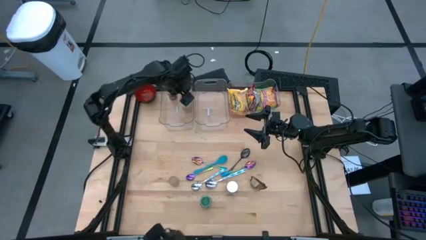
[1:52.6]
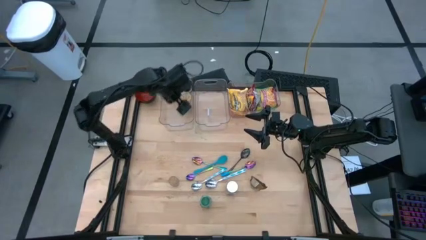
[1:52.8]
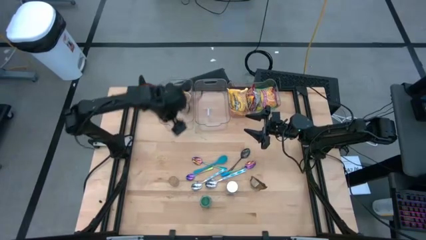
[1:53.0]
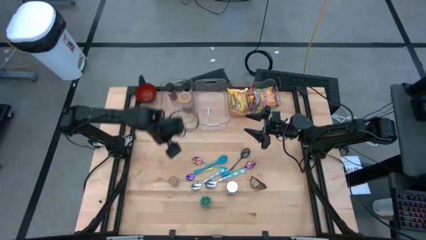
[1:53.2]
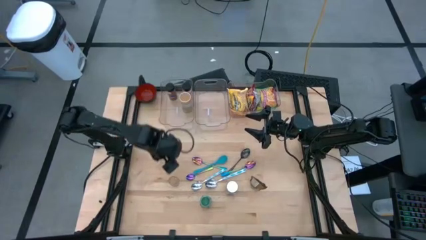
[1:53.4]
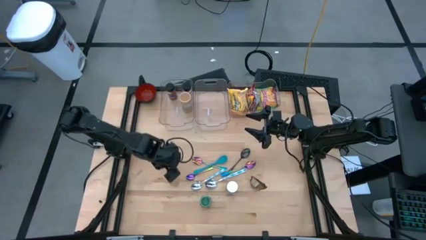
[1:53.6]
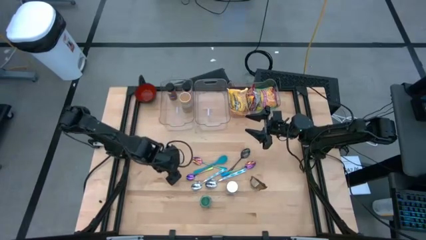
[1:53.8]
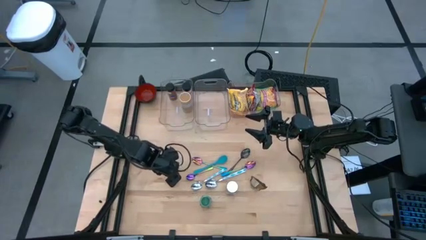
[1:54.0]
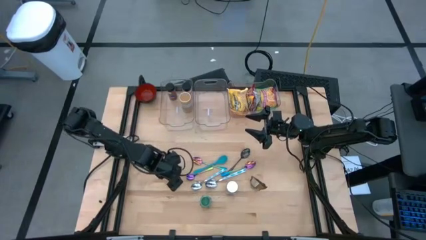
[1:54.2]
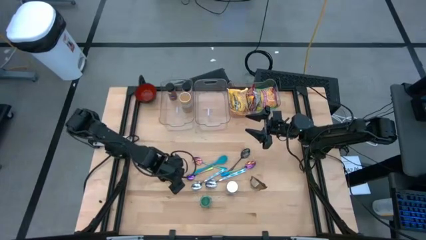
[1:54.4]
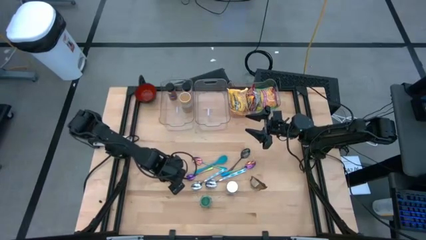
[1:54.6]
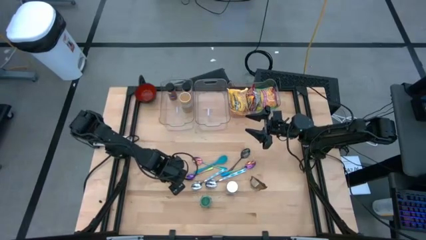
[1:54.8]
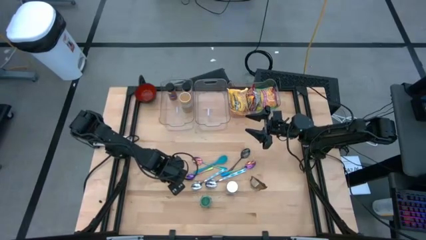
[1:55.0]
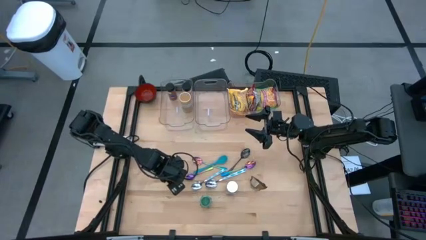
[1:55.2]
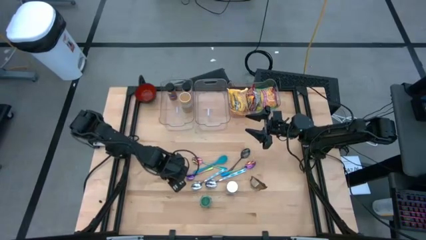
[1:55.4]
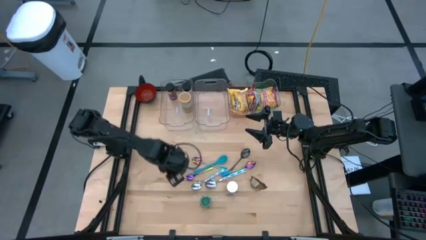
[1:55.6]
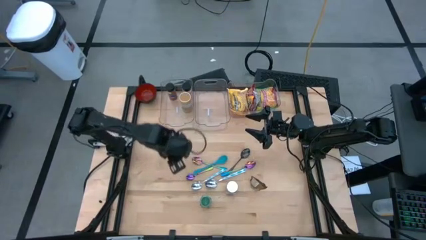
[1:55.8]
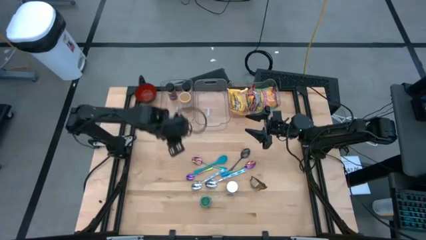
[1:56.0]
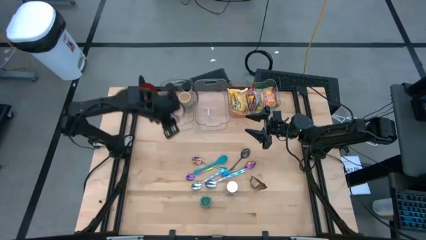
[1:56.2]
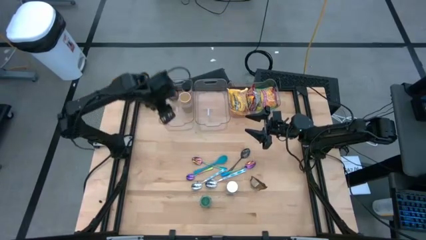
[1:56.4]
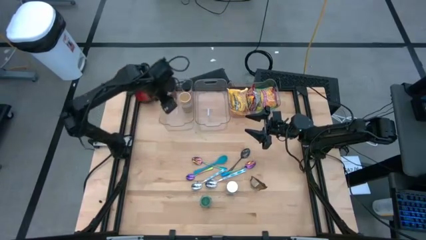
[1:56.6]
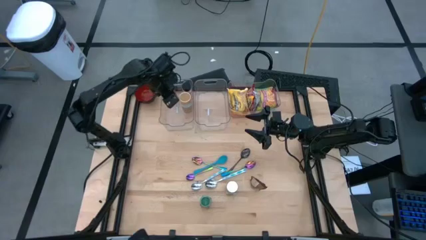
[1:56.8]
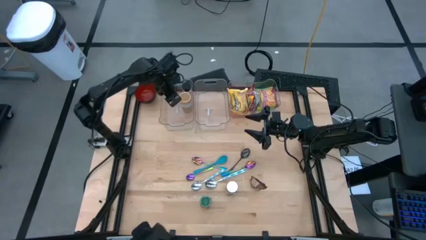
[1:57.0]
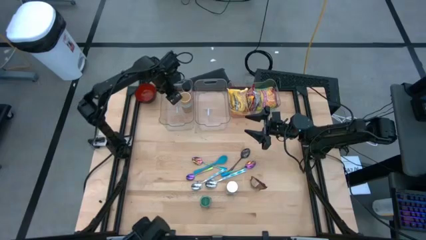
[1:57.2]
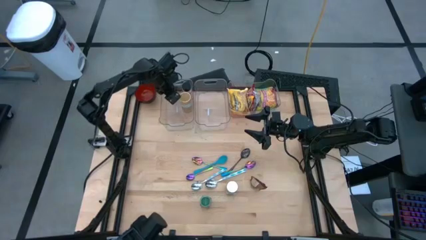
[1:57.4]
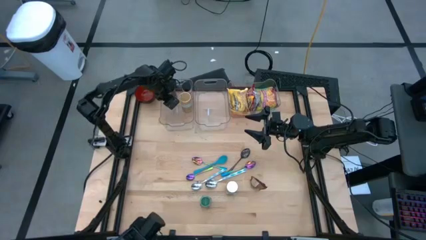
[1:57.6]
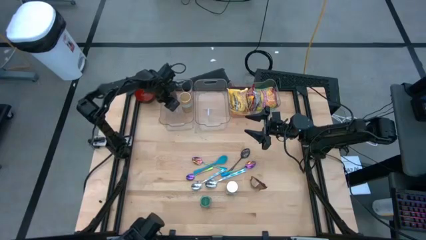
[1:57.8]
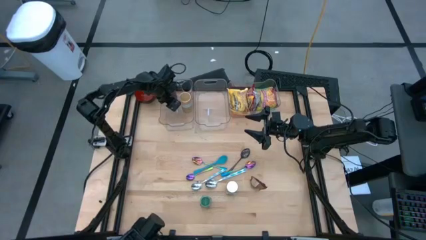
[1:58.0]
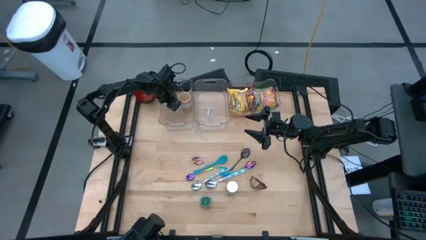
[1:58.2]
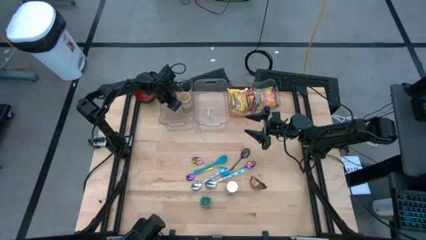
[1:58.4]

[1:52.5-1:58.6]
Task: Pick & Place Food Item
Put the brown seasoning bottle into the left transparent bin

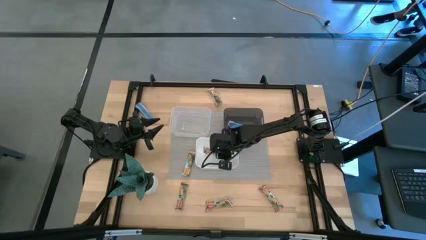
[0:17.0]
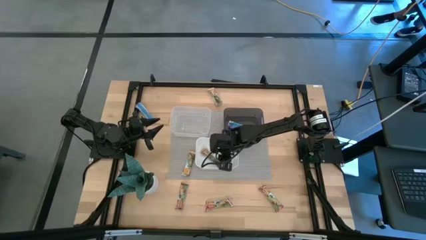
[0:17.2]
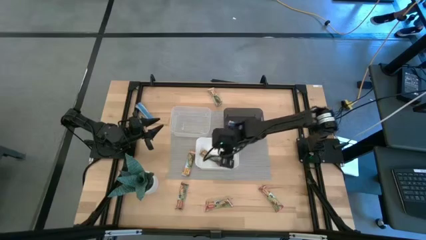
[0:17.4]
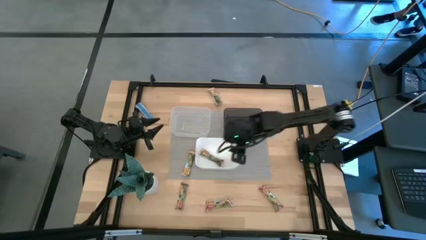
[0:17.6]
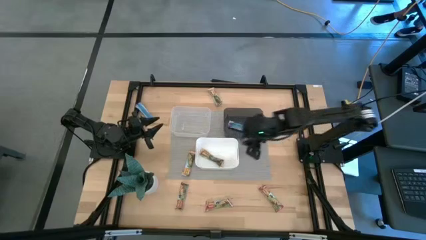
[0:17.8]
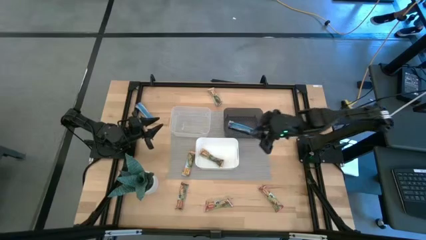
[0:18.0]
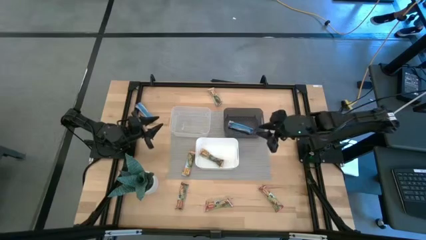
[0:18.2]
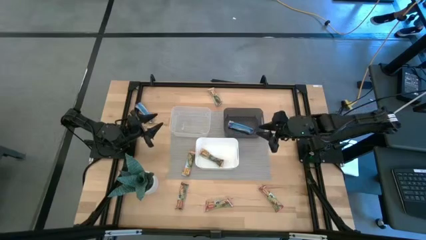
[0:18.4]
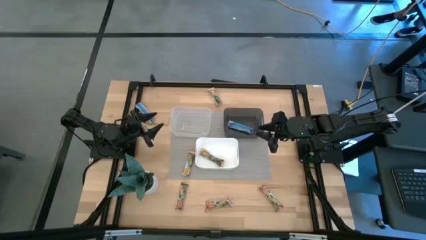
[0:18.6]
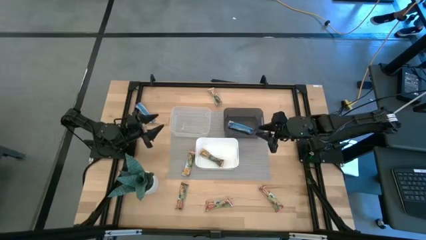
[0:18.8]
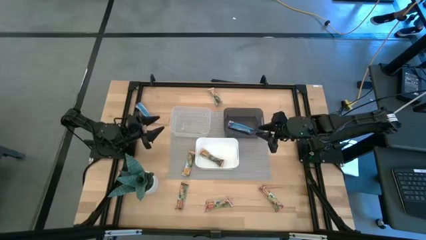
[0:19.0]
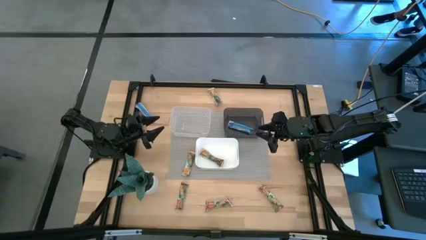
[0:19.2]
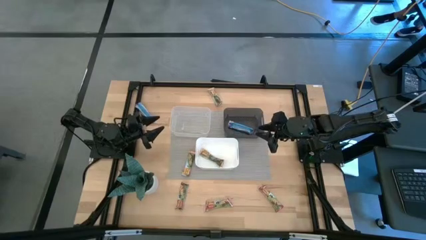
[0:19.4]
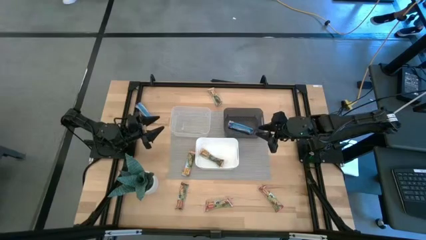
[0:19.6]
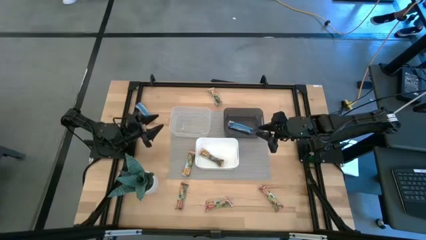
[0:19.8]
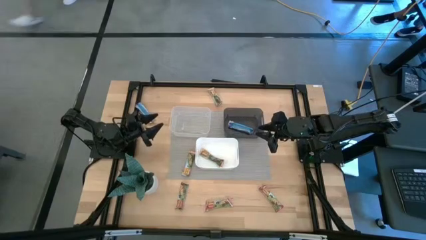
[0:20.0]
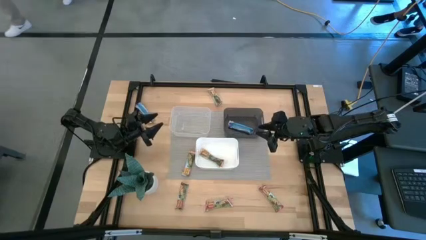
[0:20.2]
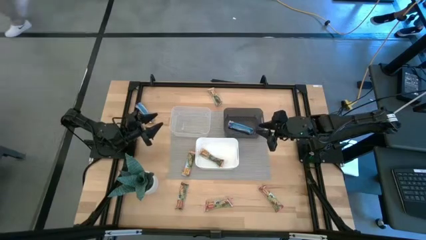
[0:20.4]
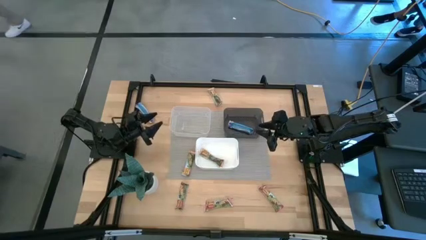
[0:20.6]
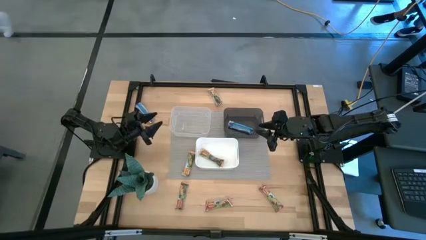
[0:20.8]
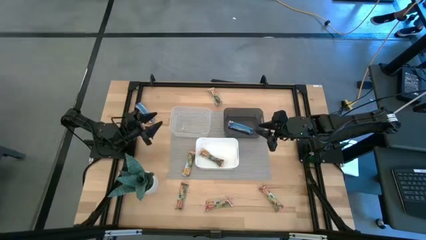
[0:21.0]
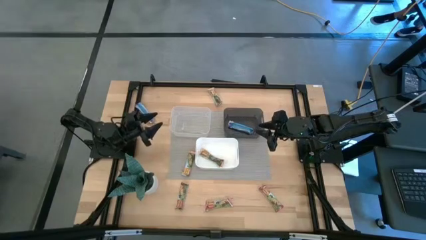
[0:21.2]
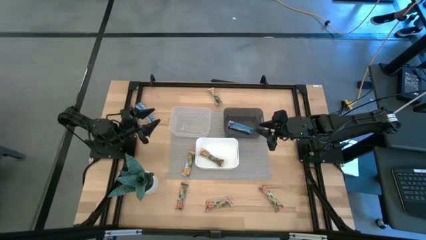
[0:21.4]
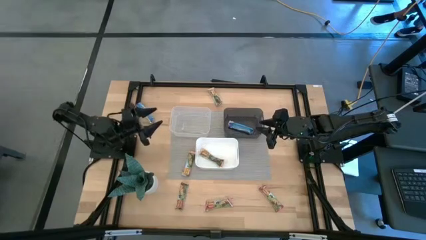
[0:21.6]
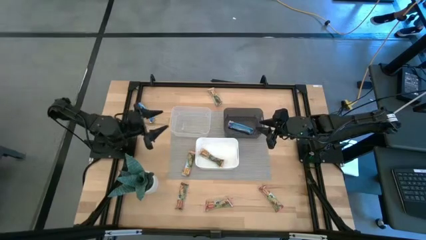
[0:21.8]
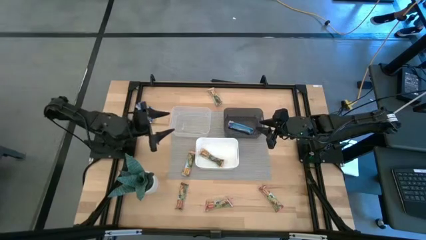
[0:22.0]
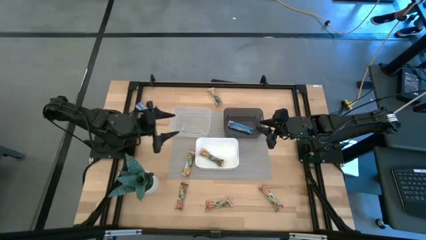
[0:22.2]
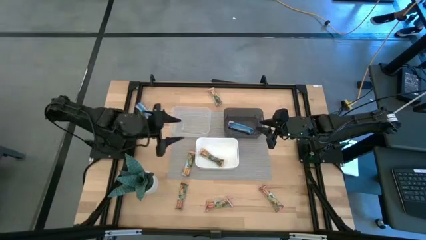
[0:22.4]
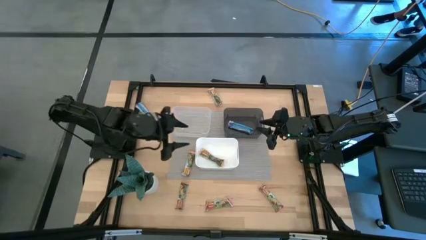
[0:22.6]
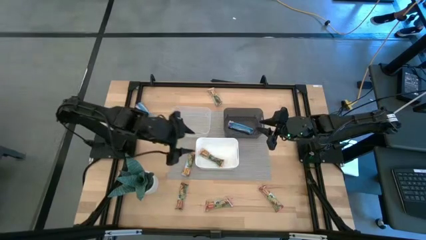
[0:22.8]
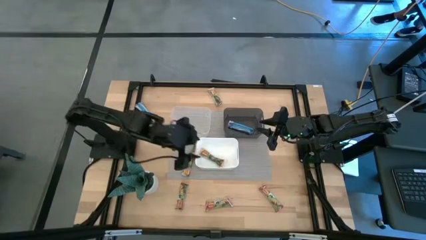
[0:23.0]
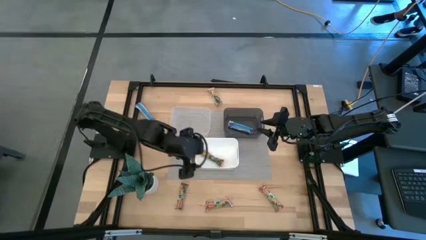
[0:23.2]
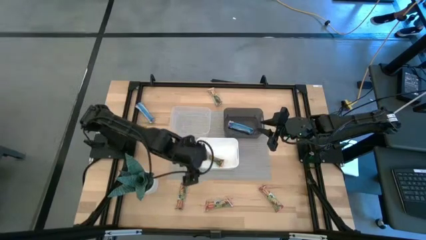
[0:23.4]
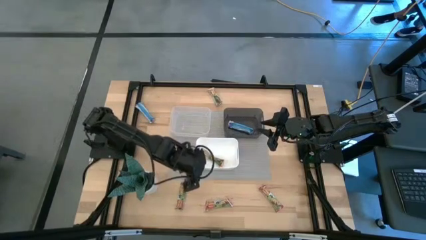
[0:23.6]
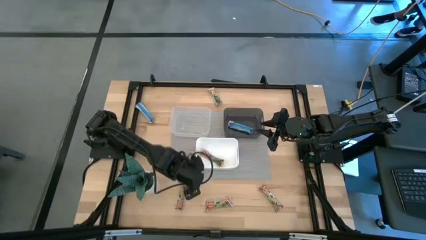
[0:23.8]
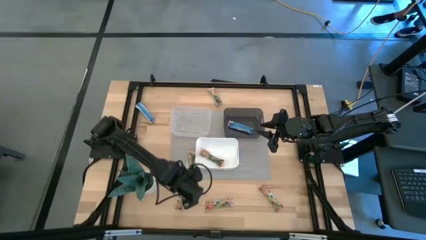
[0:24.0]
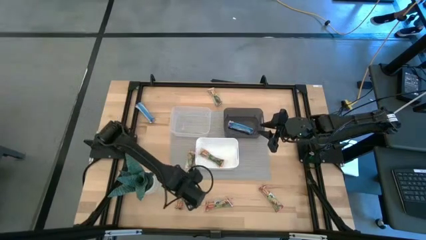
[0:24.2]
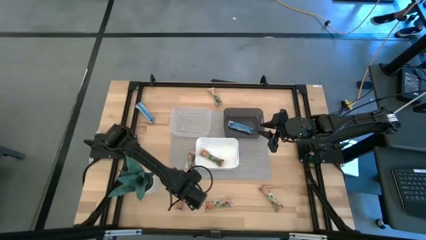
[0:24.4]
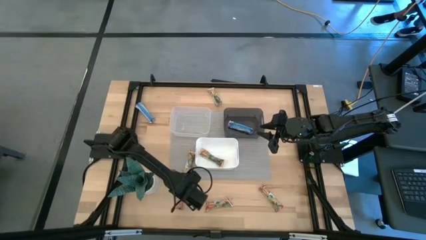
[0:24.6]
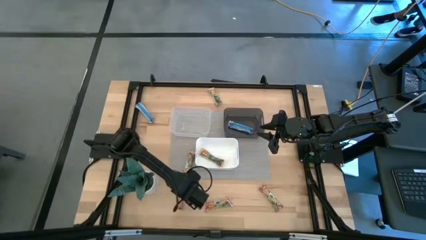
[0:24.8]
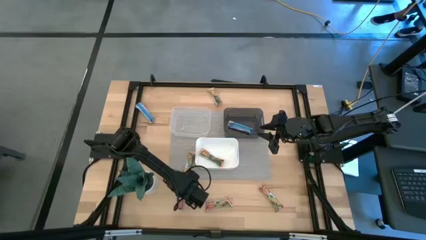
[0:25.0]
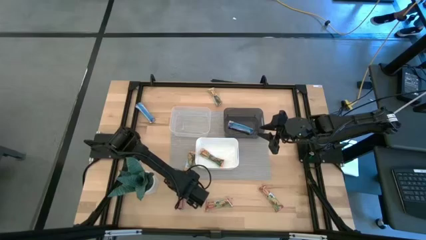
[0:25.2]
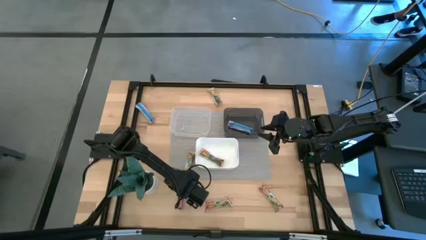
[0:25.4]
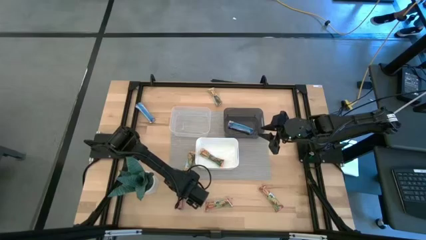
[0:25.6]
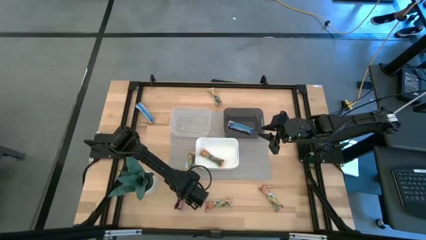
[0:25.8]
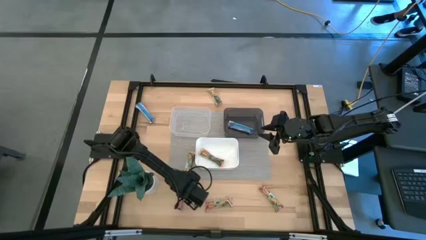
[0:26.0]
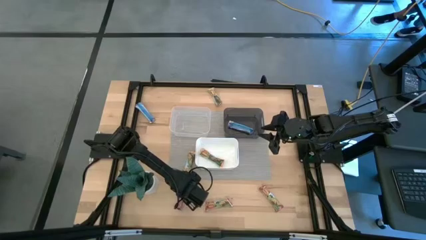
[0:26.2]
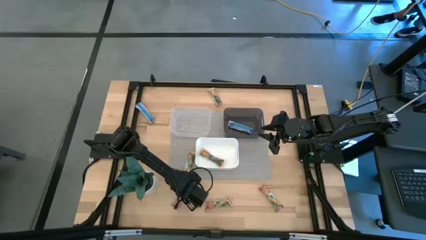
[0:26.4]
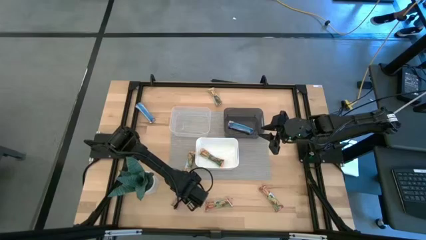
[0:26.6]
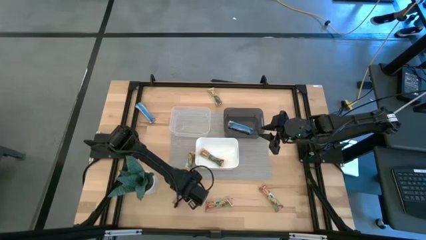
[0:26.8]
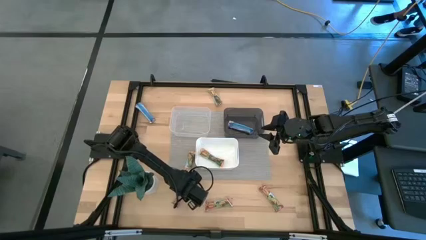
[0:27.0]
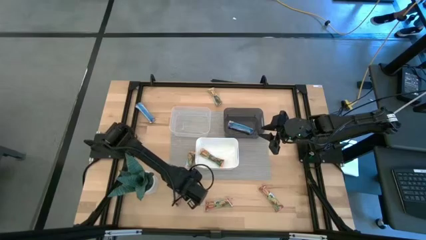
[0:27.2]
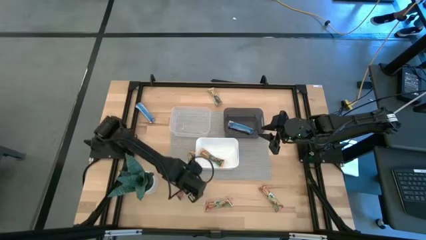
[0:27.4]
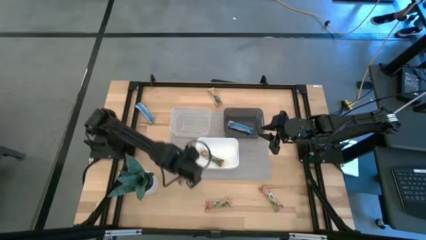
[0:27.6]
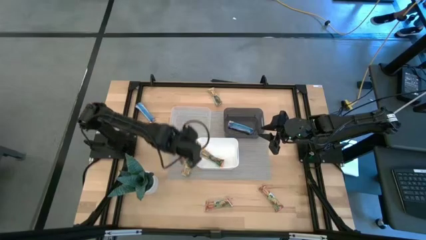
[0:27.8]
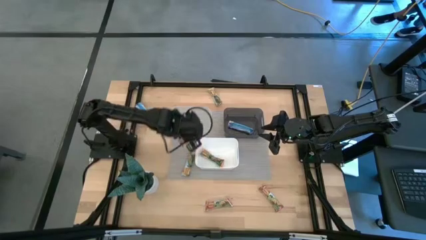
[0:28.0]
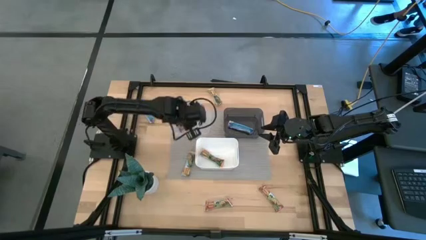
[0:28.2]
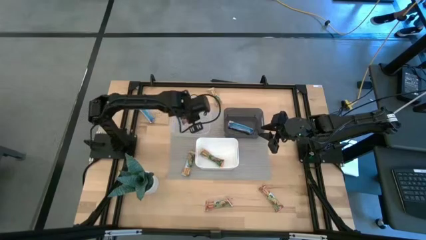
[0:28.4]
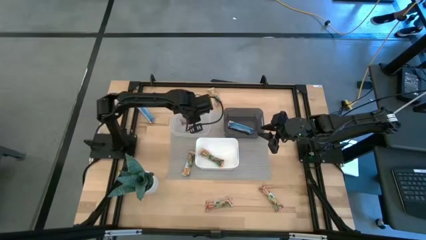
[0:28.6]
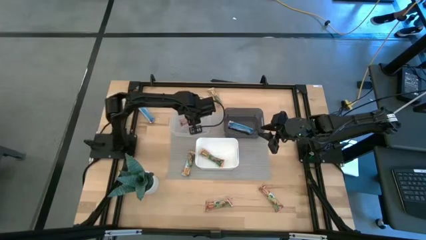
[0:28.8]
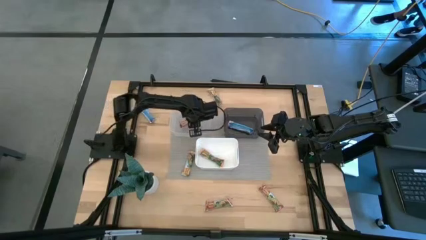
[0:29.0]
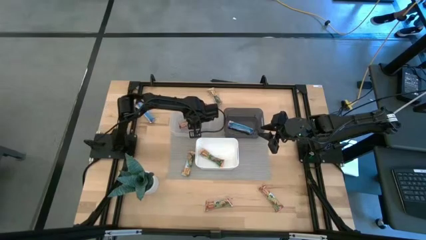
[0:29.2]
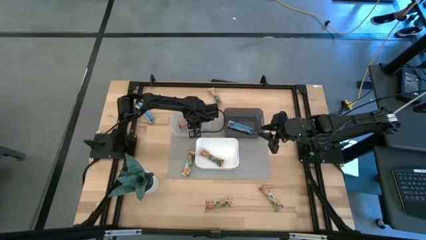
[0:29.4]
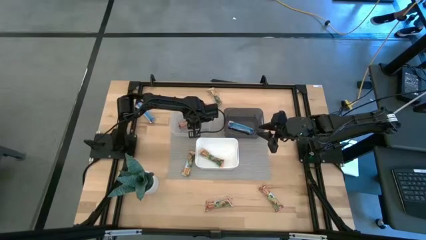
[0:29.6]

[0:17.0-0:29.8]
Task: Pick and place Granola Bars by type
Put the left red granola bar into the transparent bin
